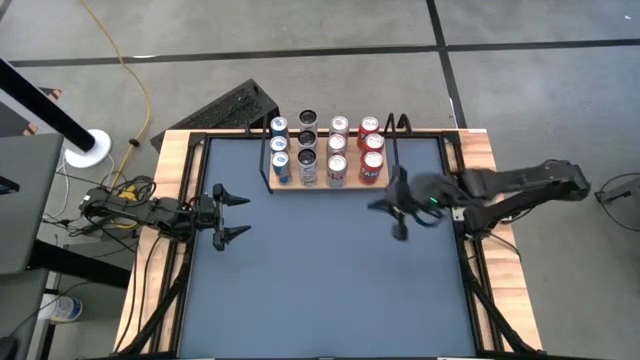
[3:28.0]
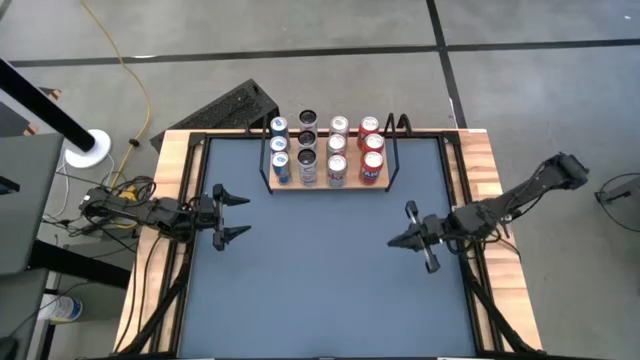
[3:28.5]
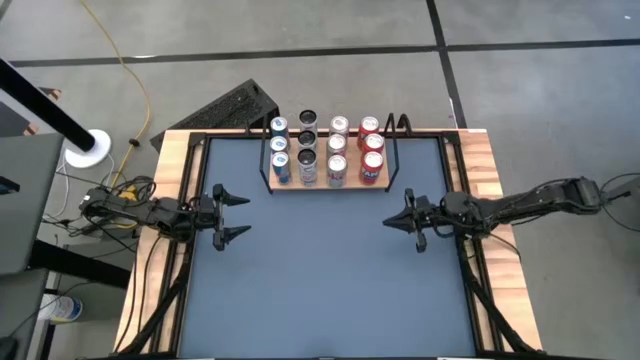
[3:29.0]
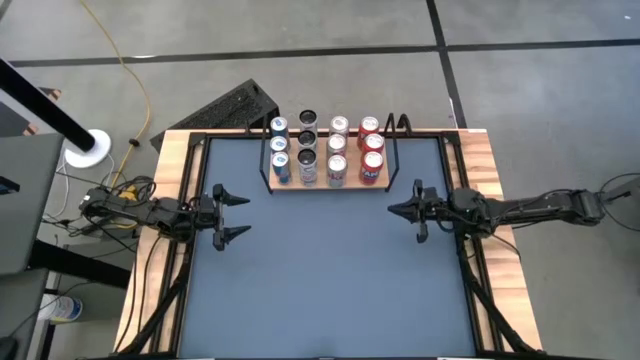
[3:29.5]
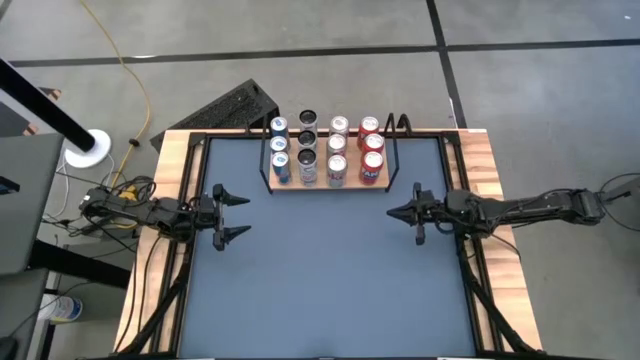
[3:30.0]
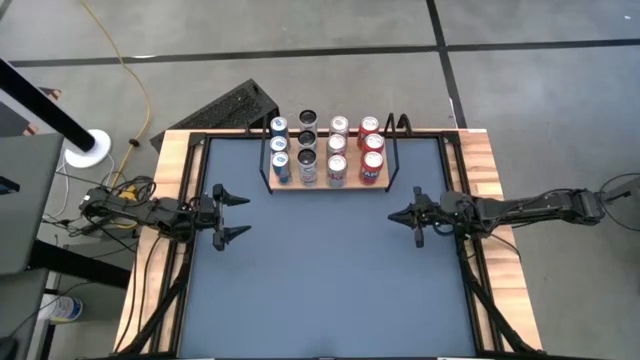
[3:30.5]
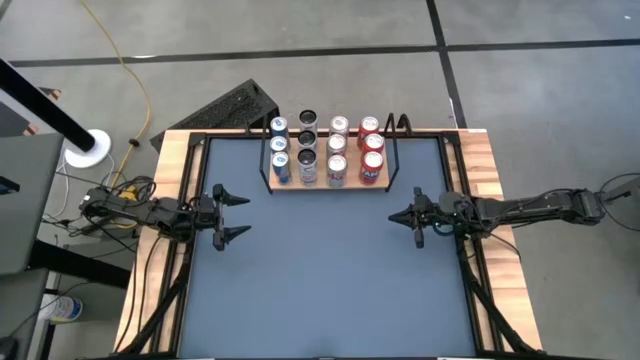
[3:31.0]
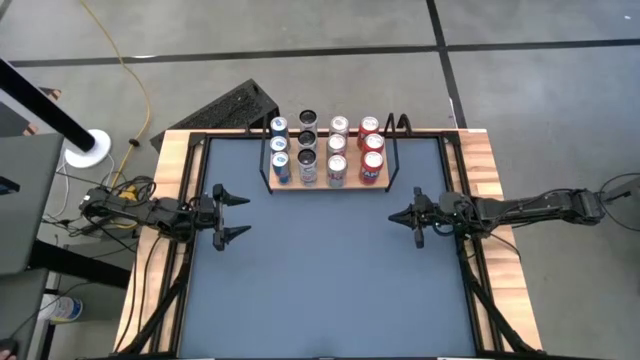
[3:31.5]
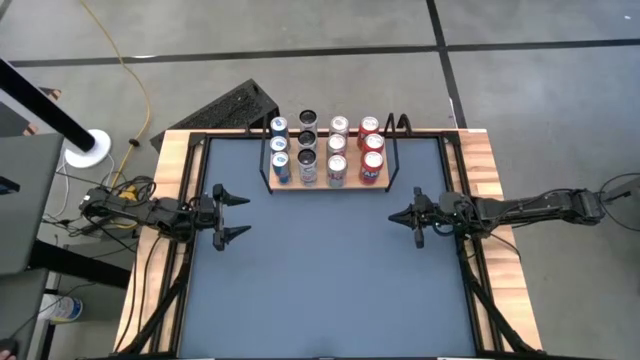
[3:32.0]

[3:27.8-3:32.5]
Task: Place canned beverage on shelf
Return to Home Position

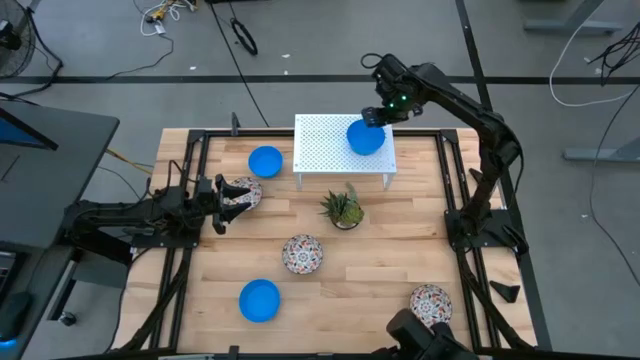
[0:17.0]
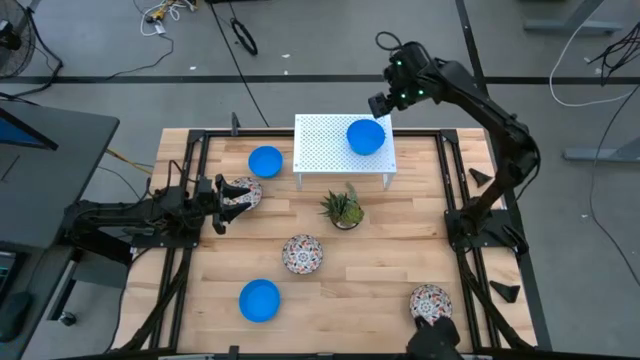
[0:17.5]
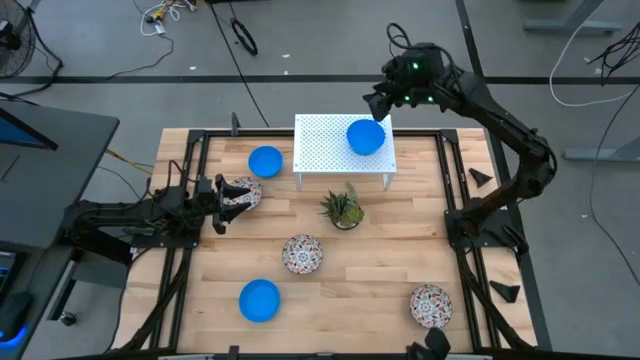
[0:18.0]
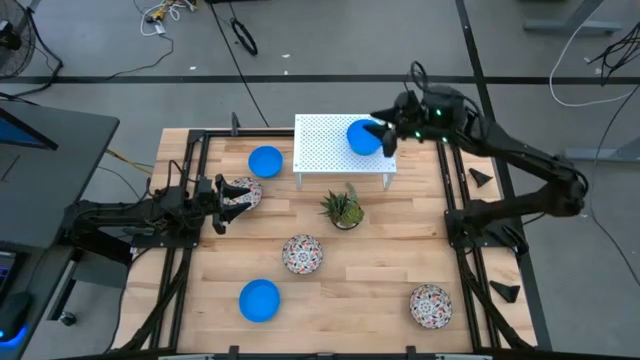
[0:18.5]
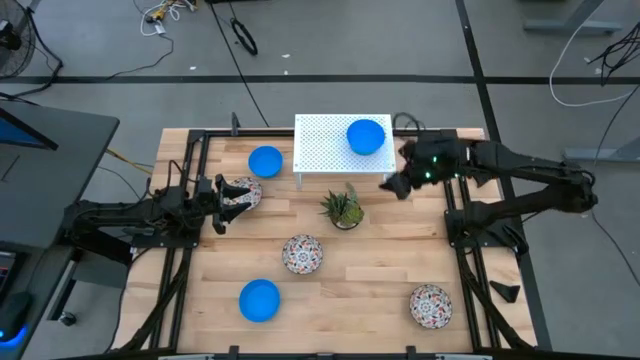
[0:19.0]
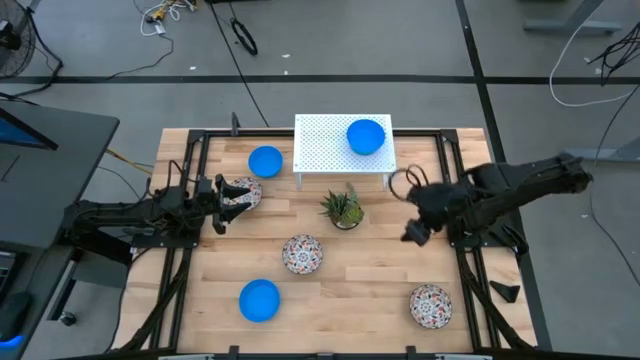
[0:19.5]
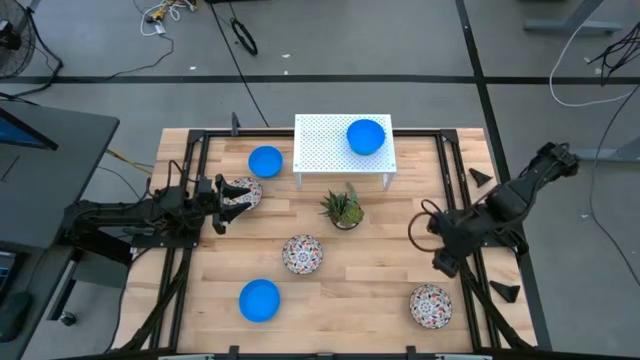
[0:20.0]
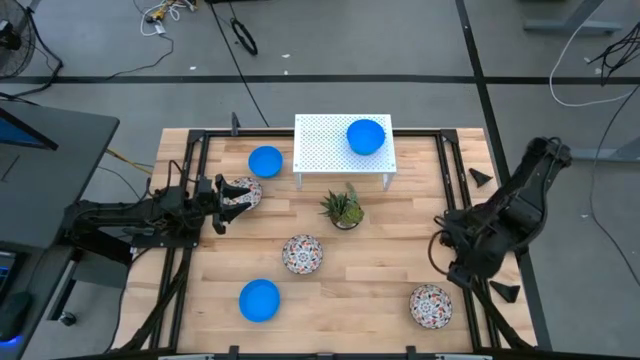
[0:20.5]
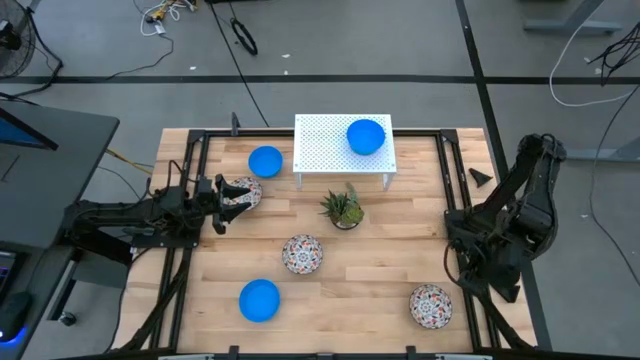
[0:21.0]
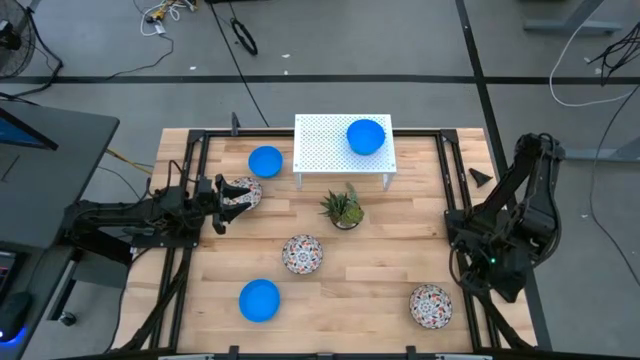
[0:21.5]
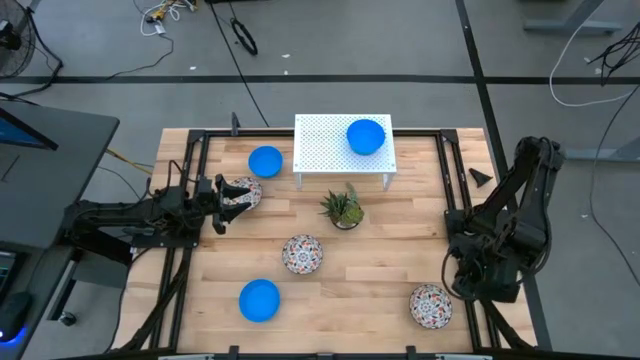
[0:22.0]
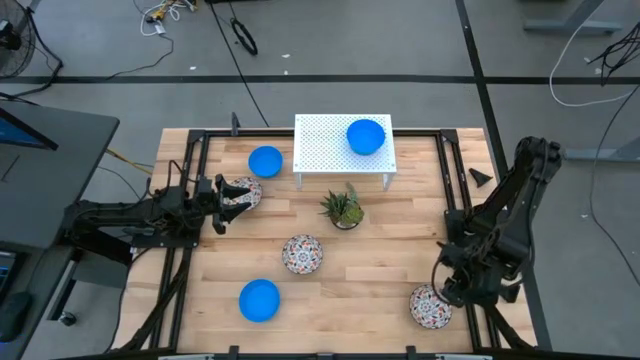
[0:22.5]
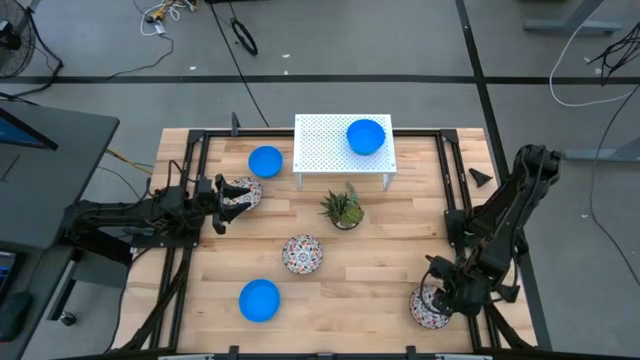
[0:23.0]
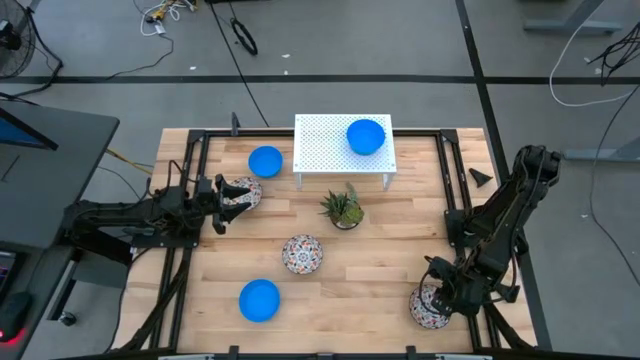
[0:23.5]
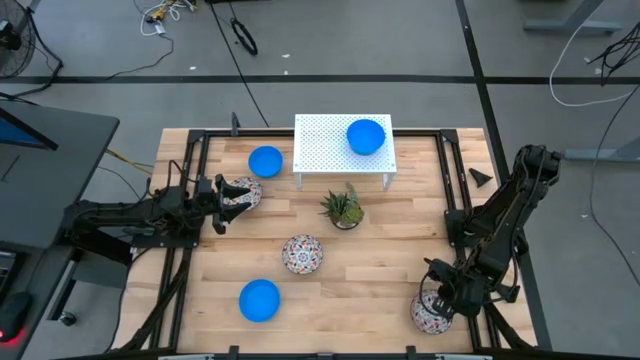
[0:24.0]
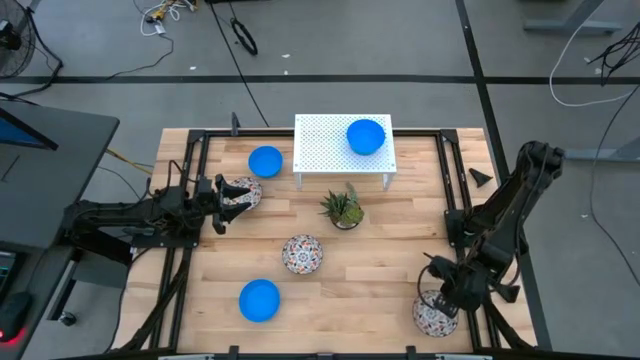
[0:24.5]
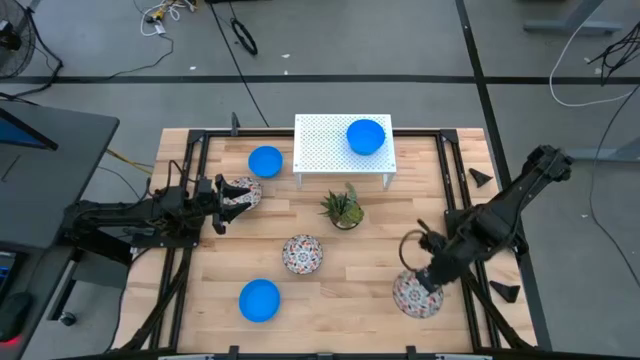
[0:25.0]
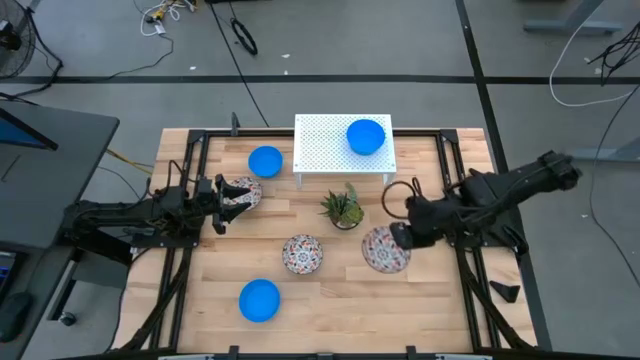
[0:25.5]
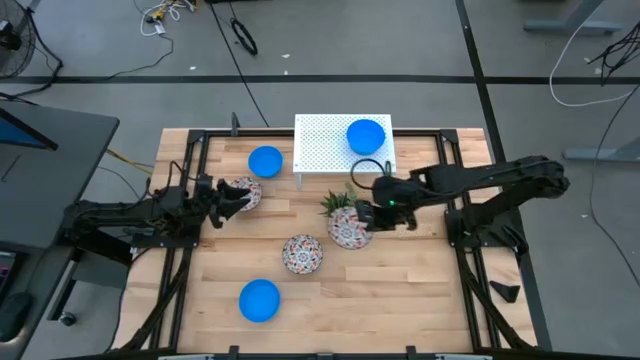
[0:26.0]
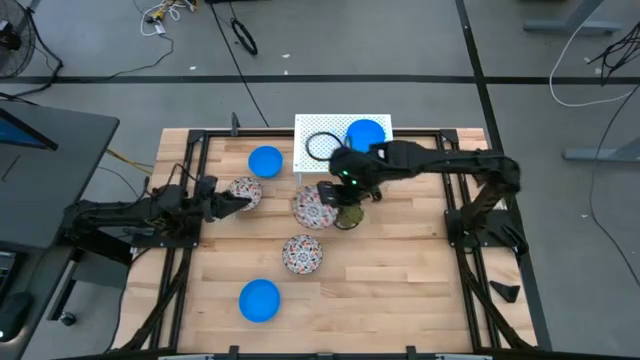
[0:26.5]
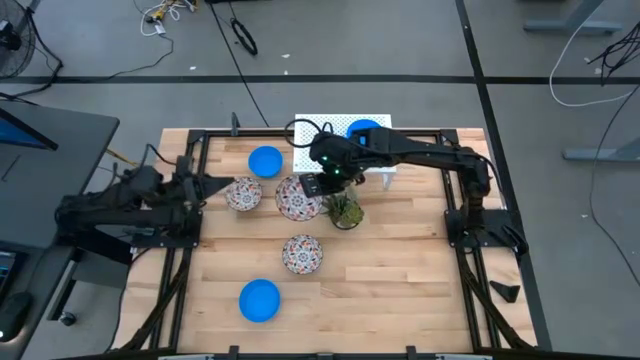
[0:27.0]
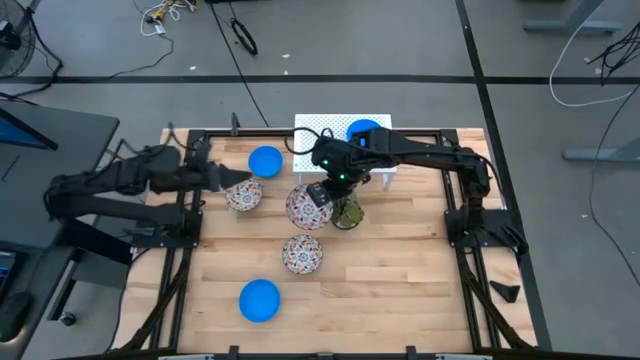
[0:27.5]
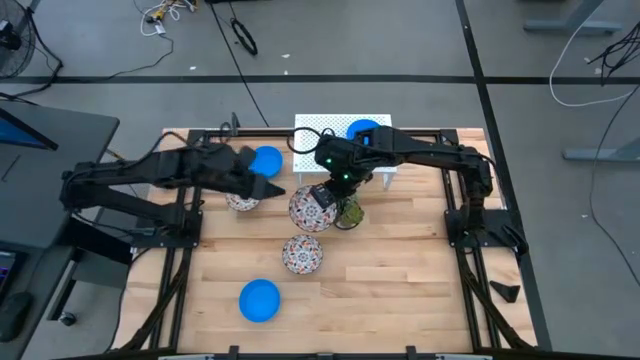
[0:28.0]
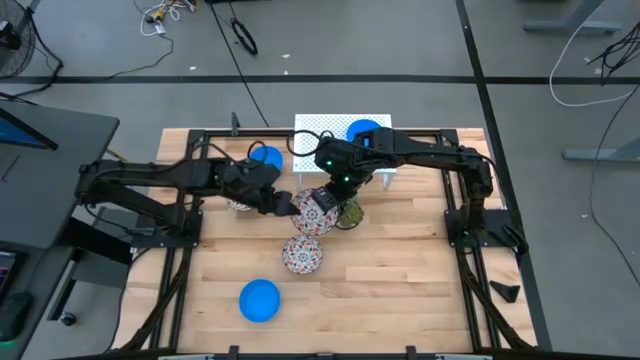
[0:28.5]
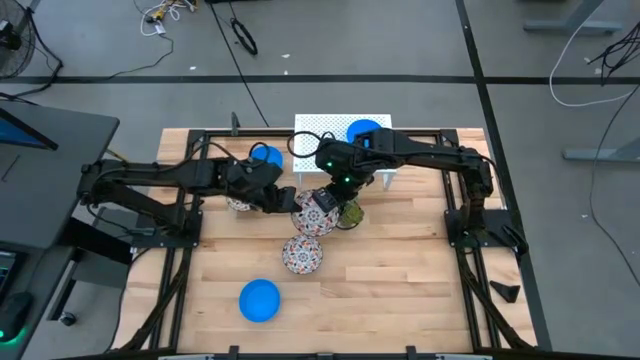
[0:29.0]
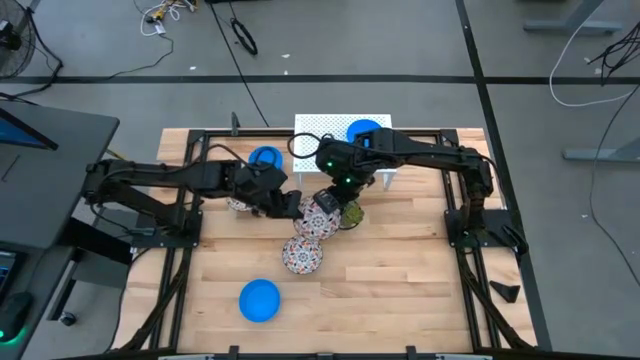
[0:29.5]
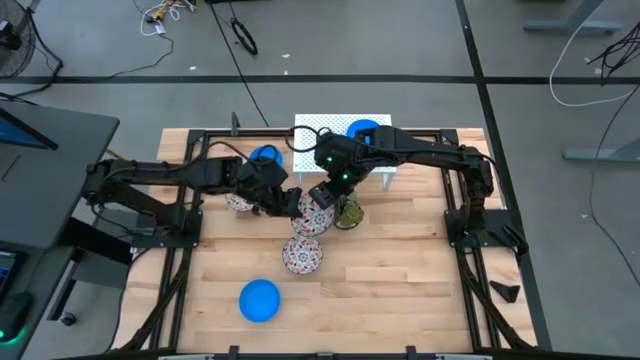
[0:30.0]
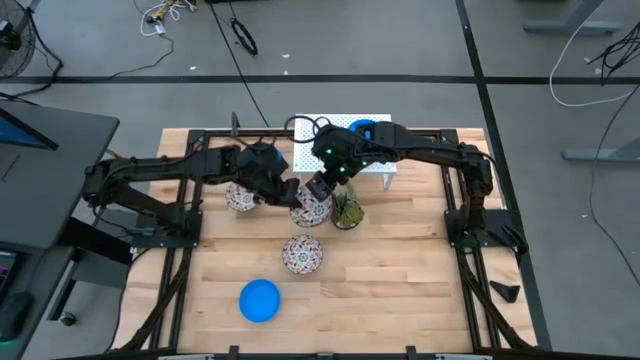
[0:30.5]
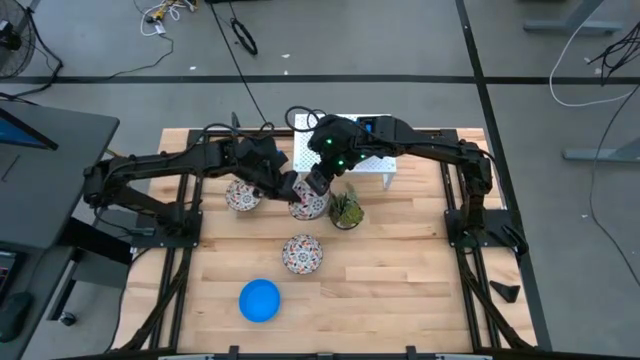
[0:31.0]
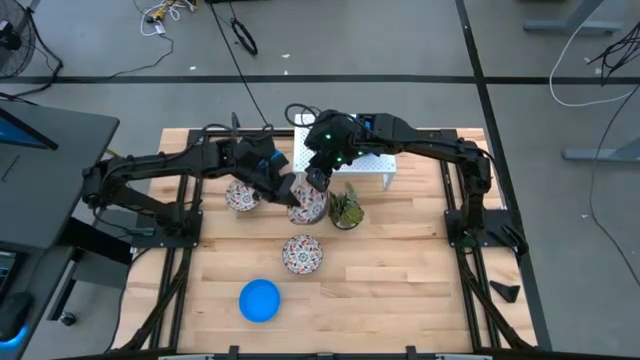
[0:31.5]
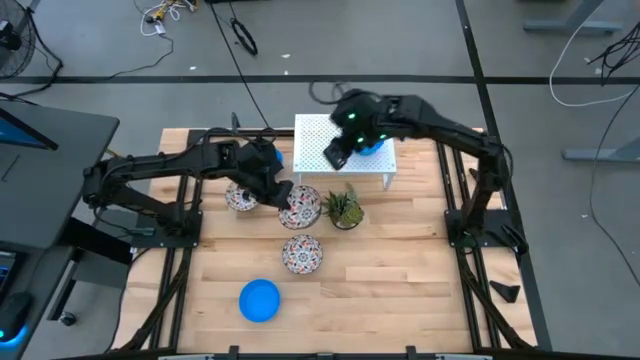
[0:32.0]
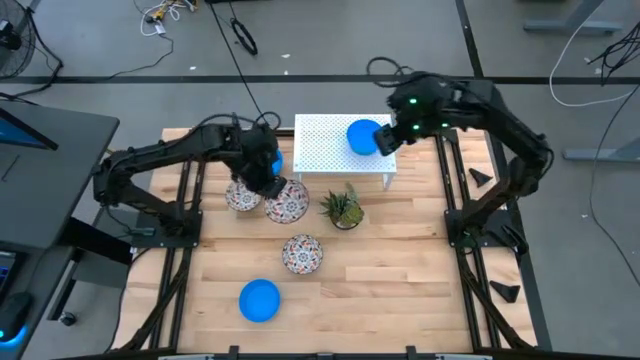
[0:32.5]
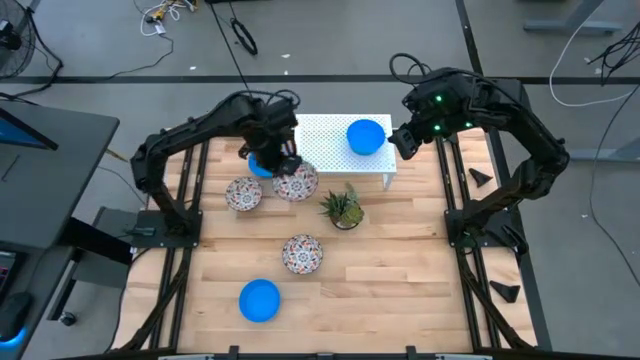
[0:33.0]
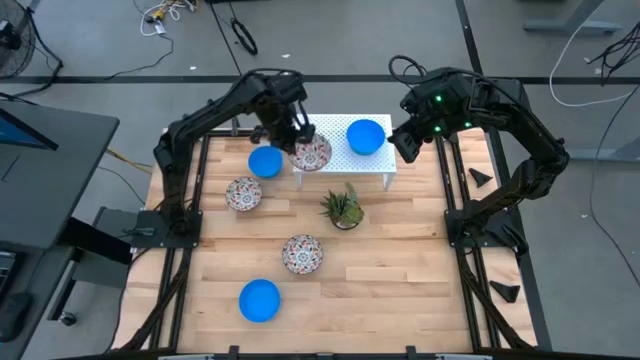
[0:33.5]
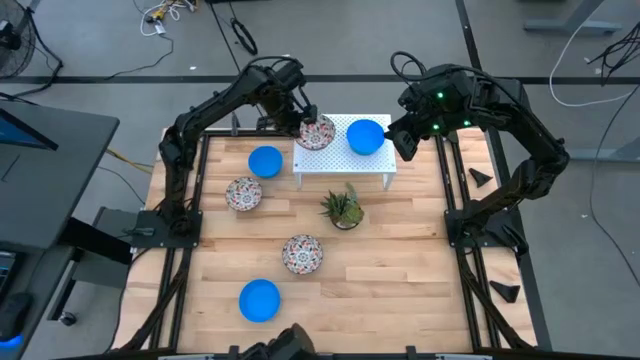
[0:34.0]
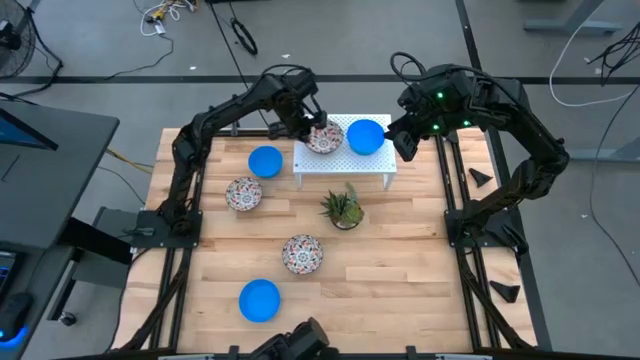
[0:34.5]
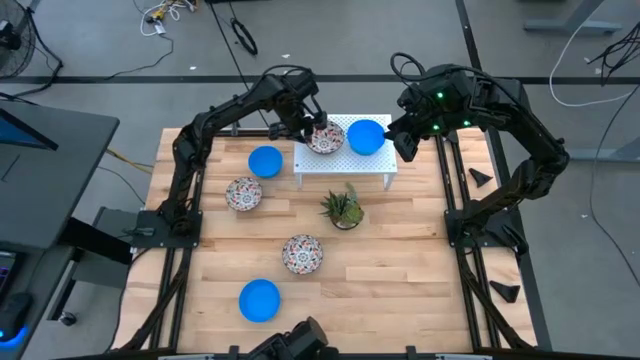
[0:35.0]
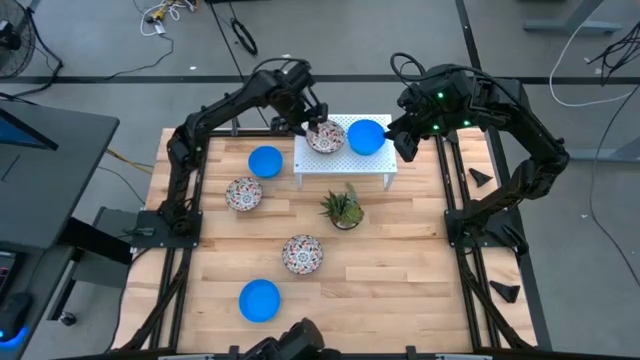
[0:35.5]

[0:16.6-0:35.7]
Task: Pick & Place Mini bowls
Put the bottom white patterned bowl on the shelf
